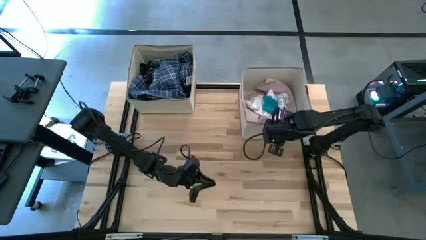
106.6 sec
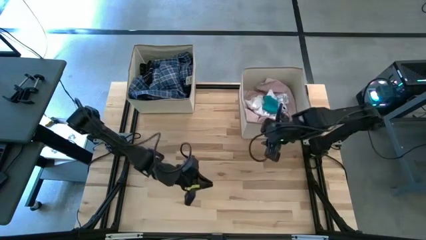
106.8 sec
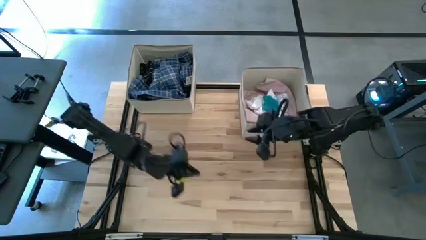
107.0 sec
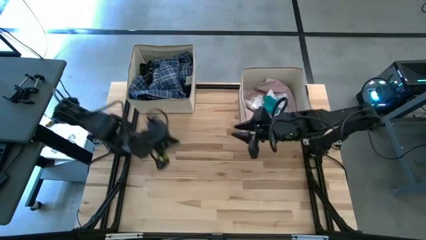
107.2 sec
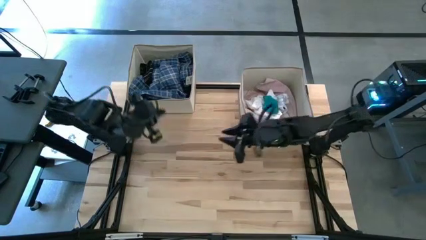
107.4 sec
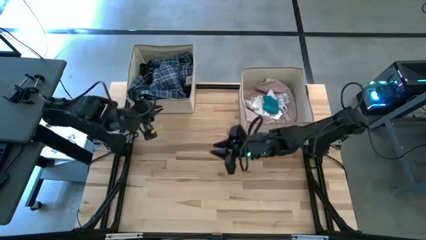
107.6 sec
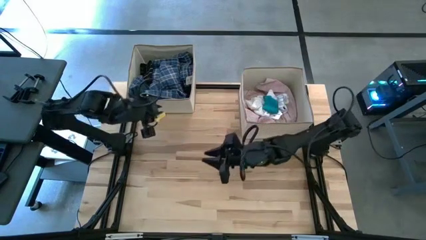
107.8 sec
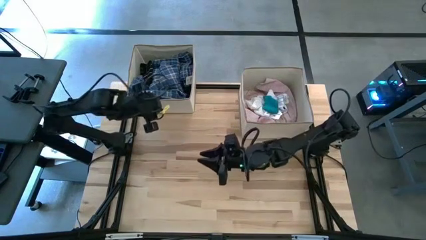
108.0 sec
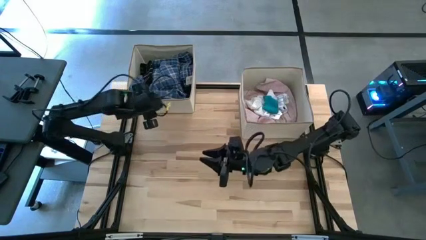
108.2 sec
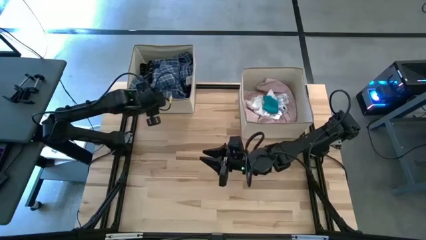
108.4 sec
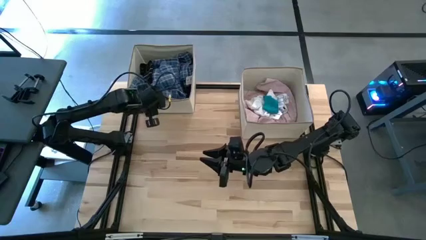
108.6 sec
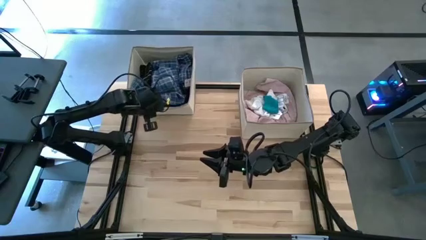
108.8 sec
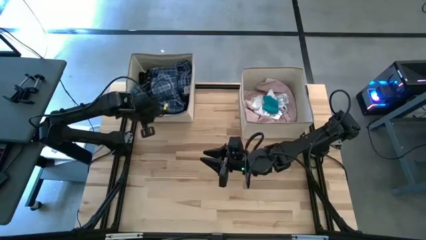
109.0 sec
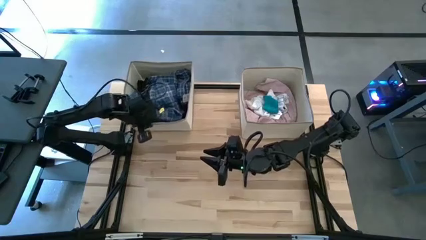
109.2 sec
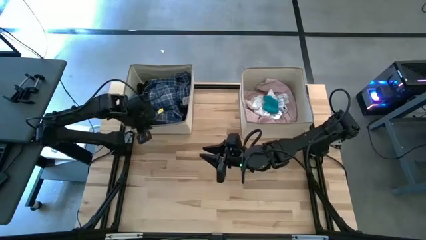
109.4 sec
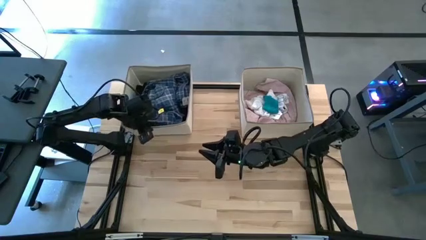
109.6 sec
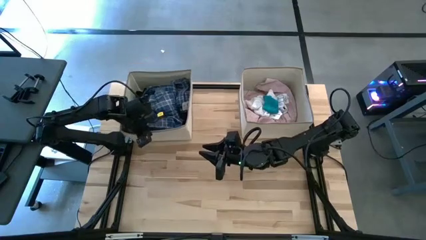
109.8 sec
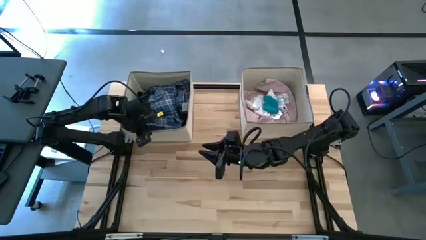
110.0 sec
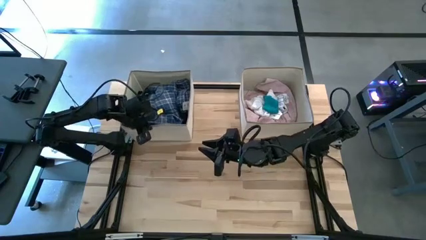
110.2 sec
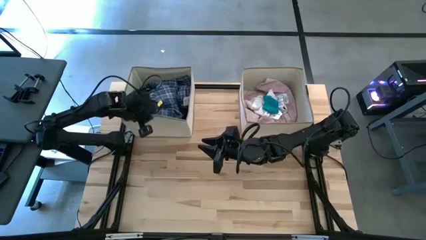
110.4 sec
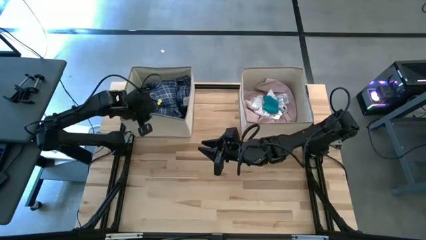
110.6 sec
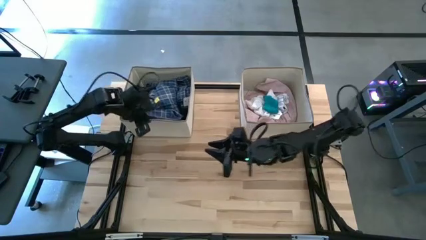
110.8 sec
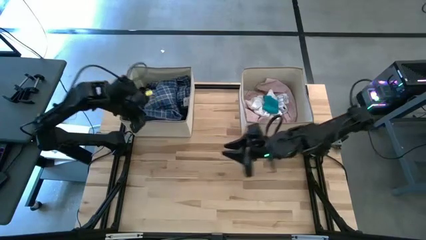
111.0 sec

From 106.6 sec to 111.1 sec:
Task: Sort clothes
Adjust the left laundry organizer

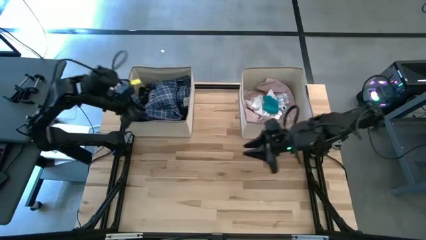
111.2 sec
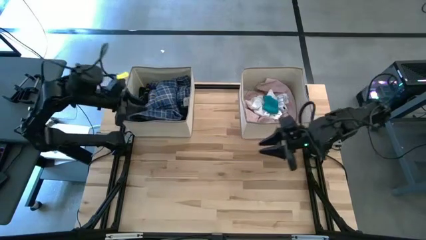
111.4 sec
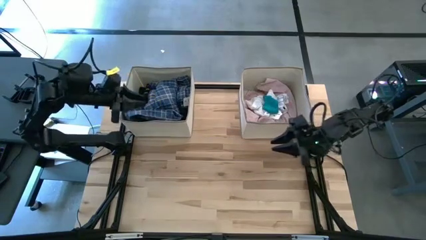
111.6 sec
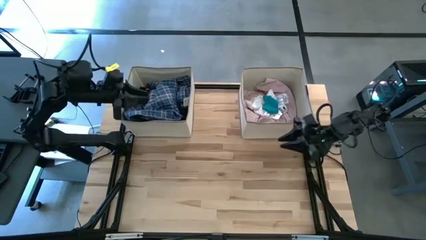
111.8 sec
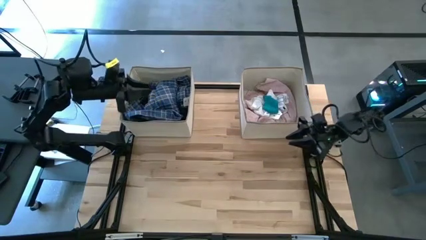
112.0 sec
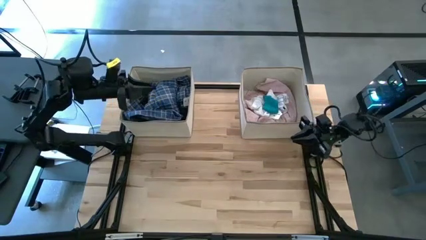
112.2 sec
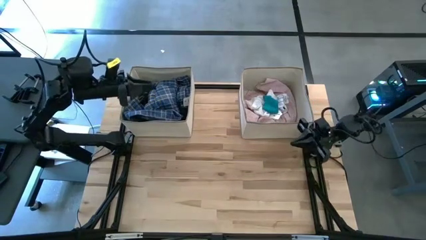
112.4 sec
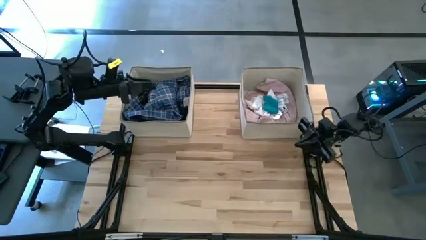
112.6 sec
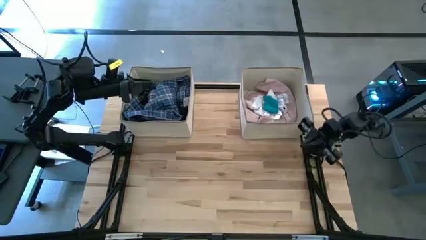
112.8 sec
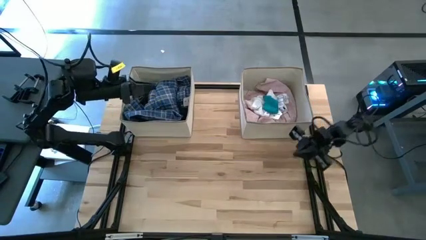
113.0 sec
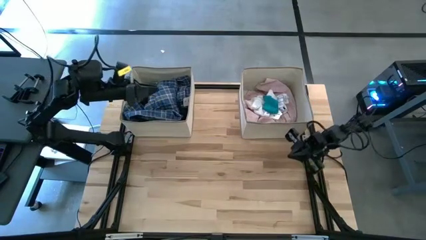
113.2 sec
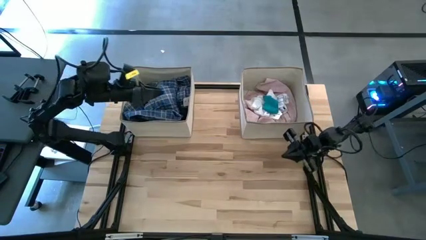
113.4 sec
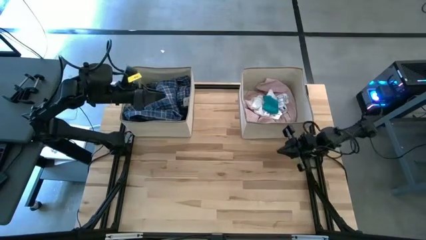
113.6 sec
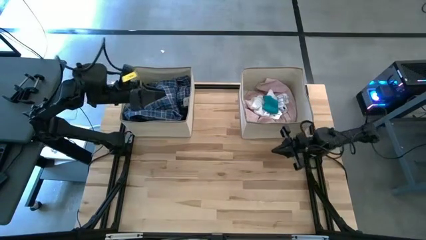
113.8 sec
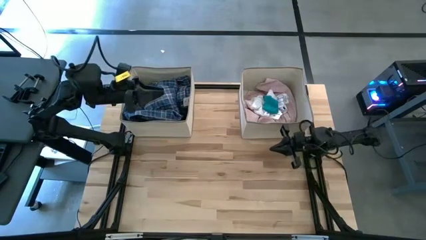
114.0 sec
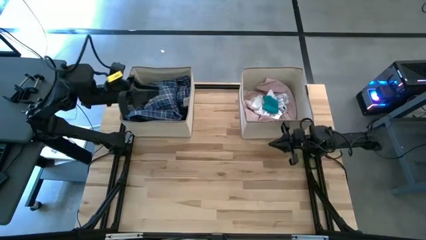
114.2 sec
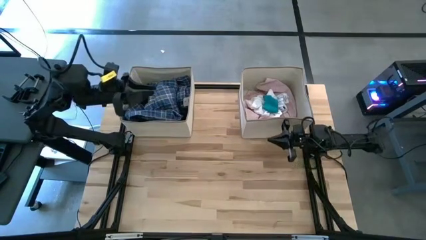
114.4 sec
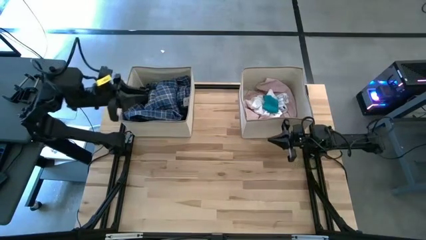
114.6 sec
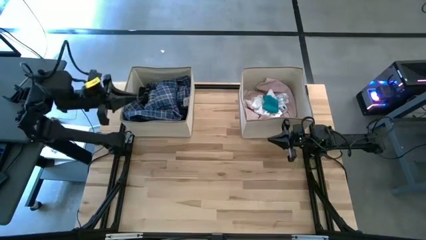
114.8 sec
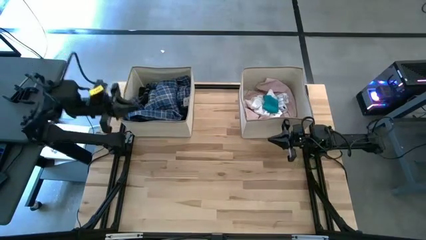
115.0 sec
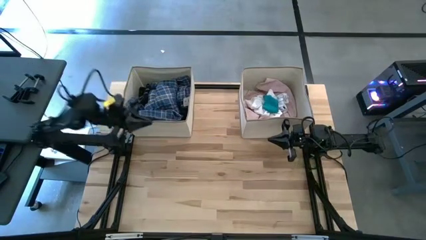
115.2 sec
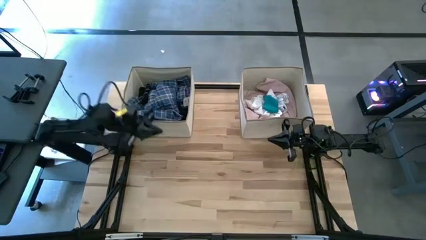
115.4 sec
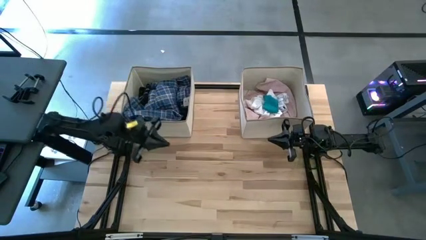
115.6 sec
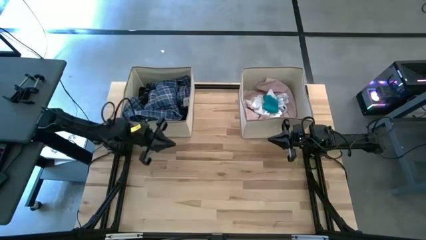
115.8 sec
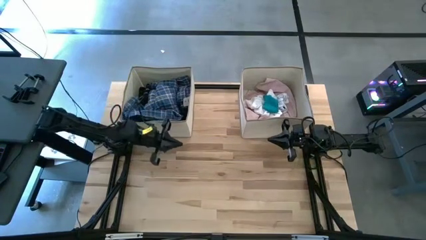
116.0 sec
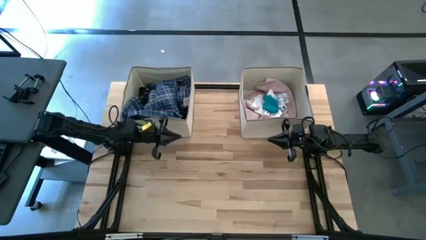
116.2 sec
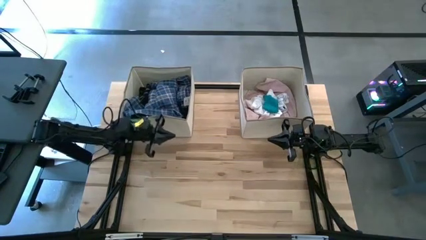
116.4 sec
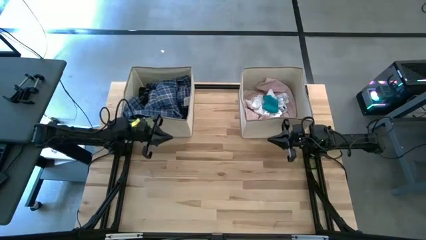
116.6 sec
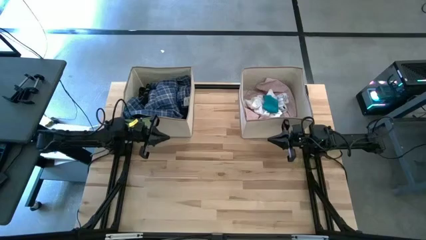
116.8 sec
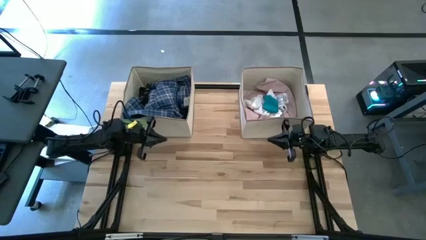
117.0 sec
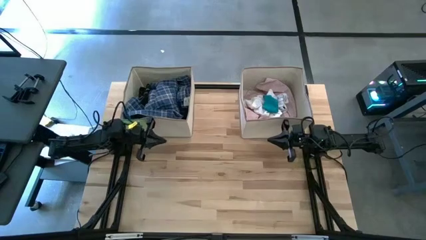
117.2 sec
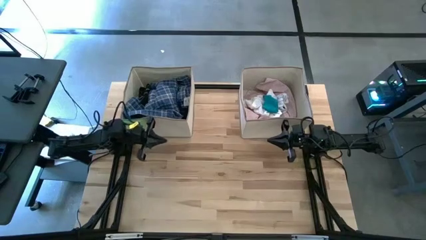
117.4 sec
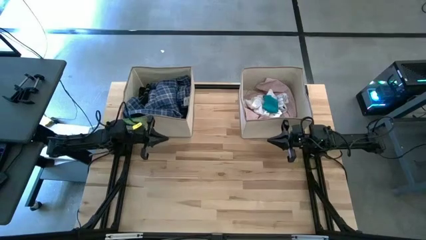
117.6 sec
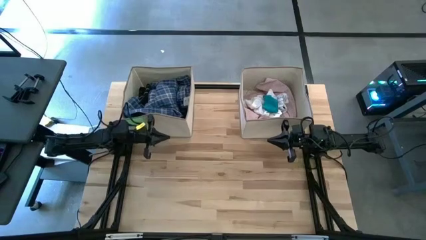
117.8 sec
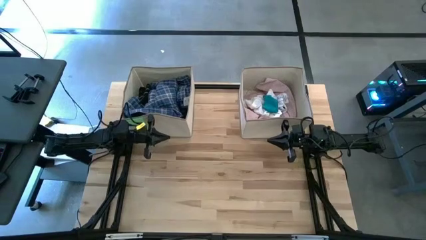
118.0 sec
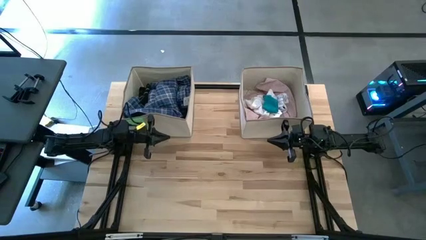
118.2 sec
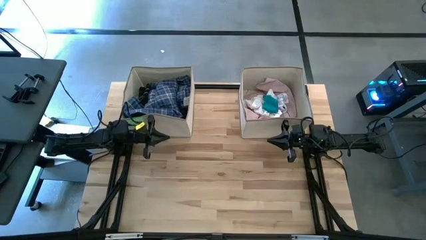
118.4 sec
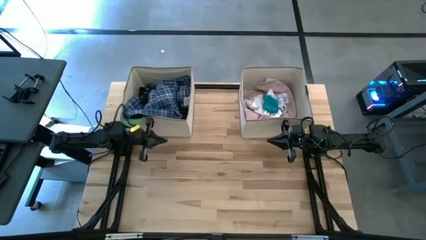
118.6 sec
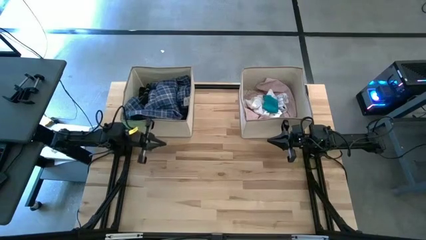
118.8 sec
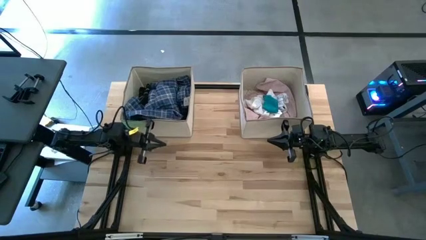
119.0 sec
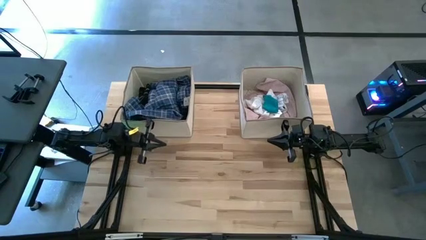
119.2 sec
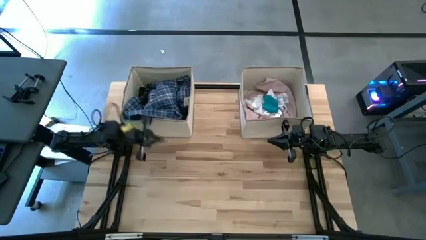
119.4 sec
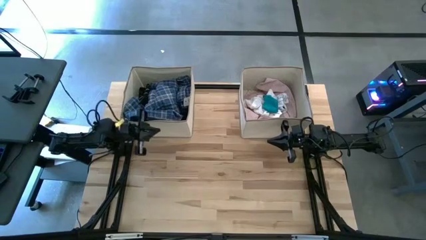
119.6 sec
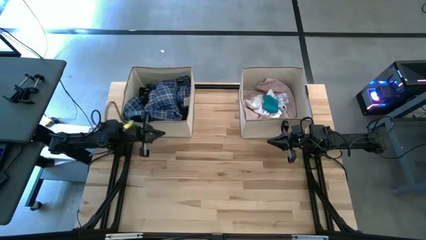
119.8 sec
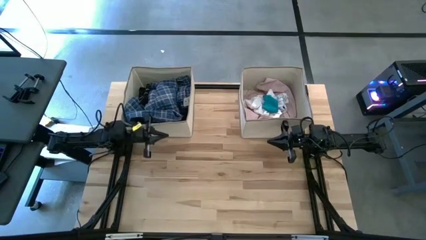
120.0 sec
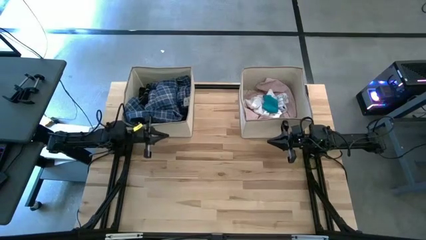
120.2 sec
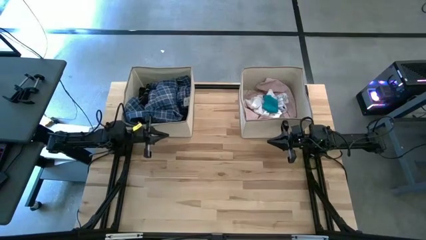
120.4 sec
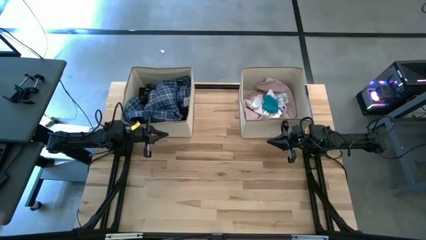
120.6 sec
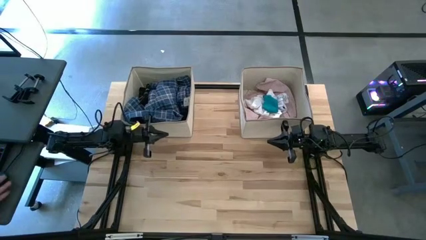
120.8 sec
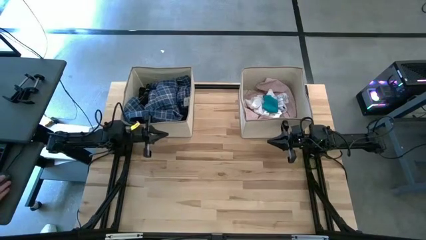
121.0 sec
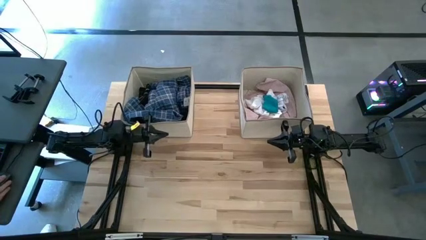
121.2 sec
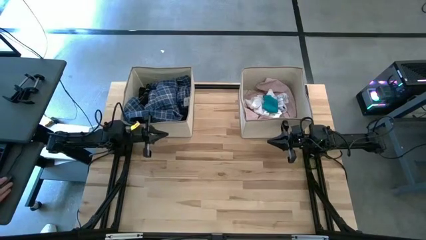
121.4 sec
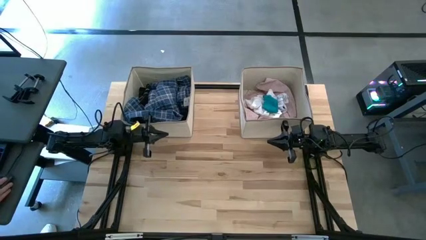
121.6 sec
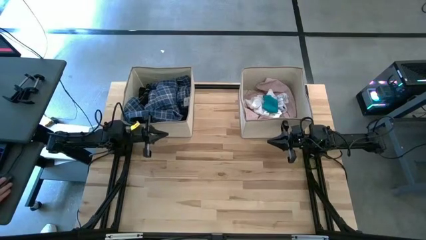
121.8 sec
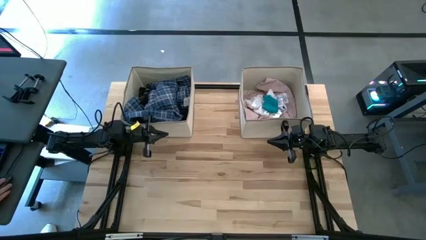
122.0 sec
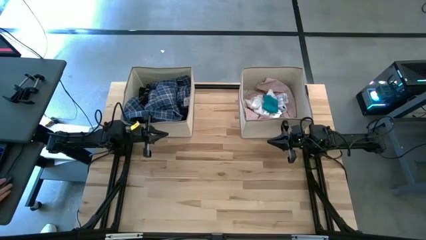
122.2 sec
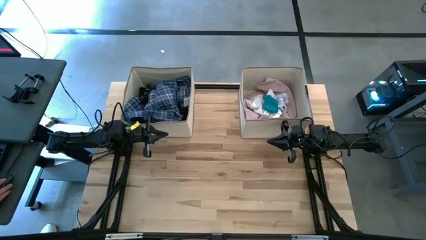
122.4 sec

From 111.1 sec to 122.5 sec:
Return to Home Position
